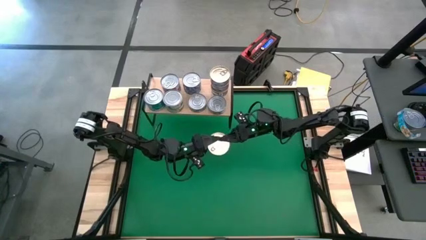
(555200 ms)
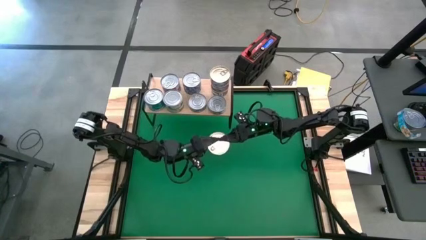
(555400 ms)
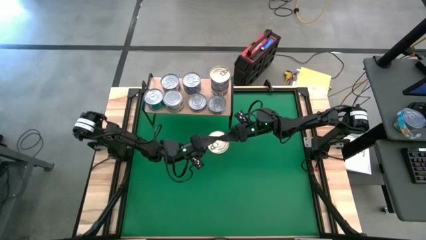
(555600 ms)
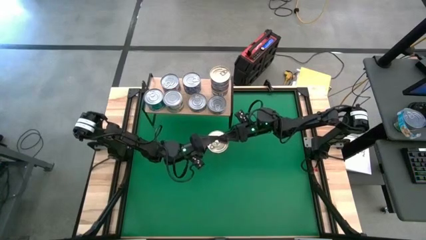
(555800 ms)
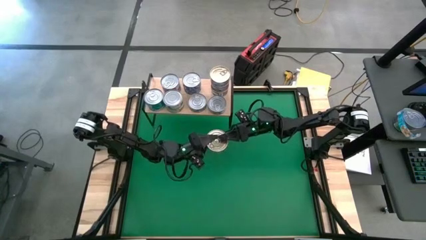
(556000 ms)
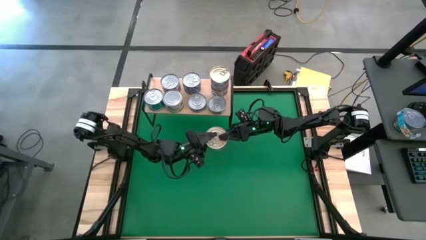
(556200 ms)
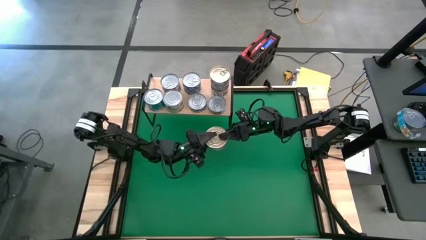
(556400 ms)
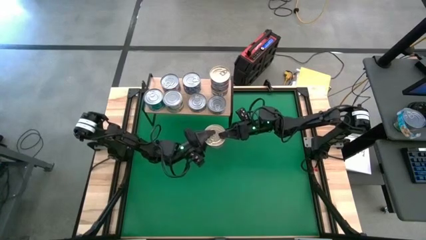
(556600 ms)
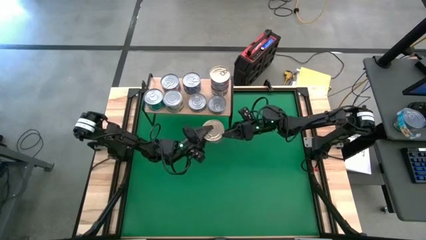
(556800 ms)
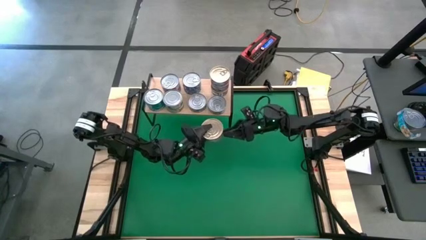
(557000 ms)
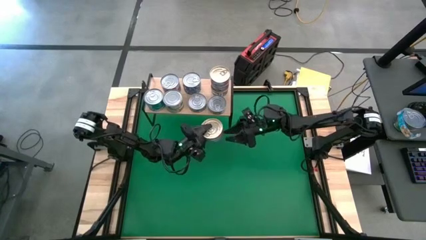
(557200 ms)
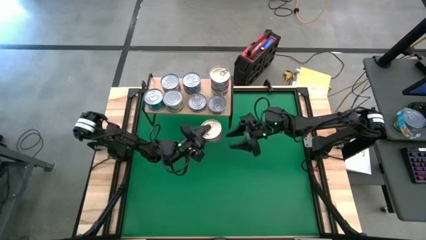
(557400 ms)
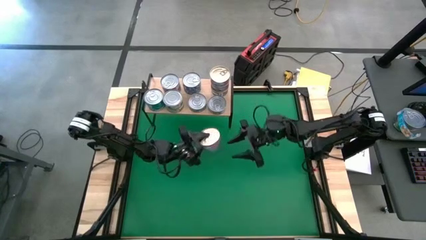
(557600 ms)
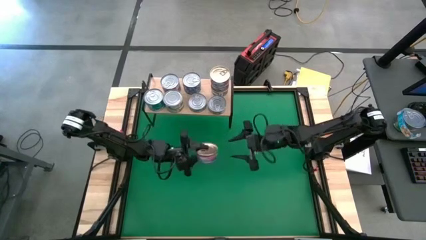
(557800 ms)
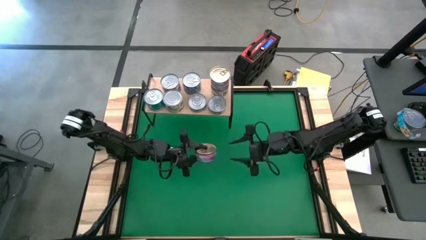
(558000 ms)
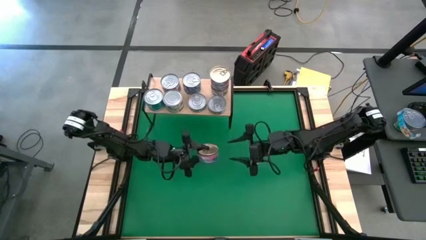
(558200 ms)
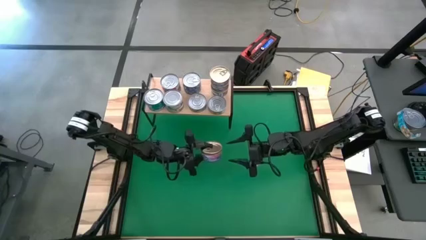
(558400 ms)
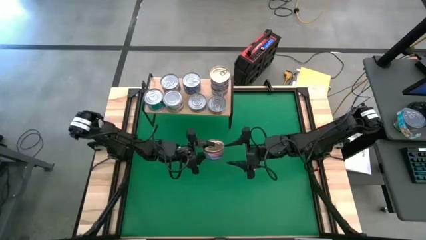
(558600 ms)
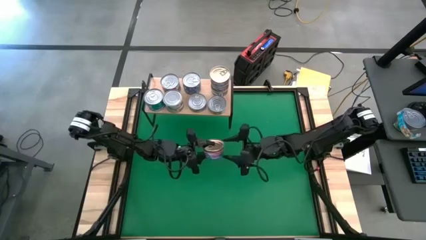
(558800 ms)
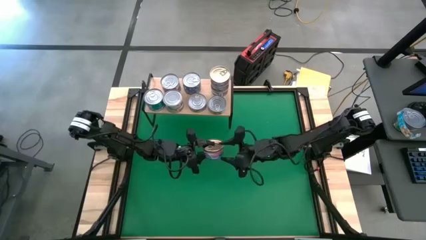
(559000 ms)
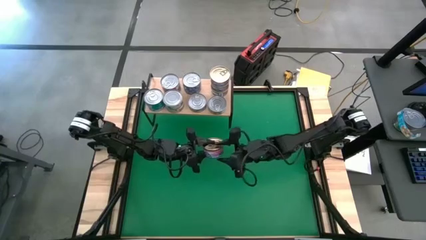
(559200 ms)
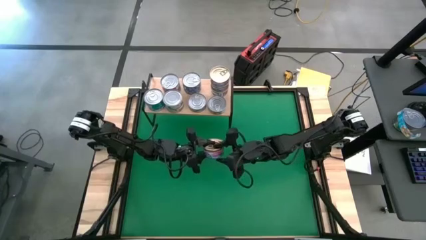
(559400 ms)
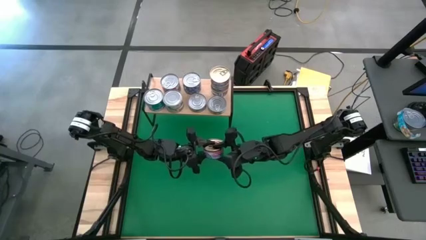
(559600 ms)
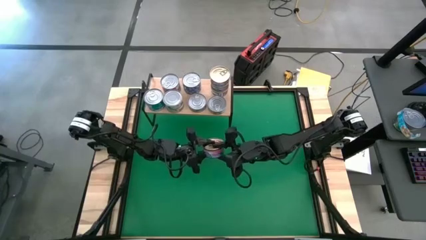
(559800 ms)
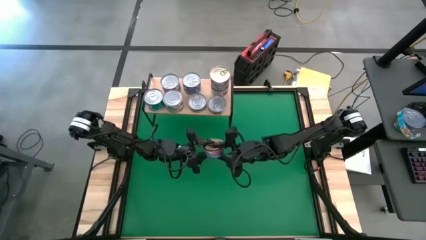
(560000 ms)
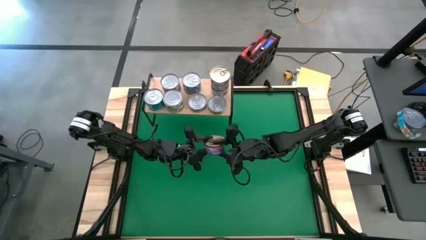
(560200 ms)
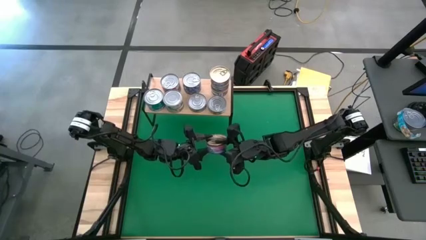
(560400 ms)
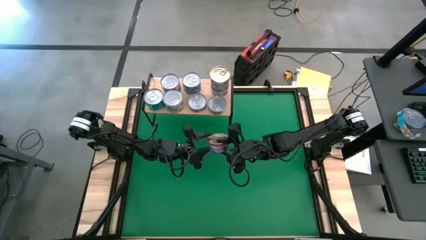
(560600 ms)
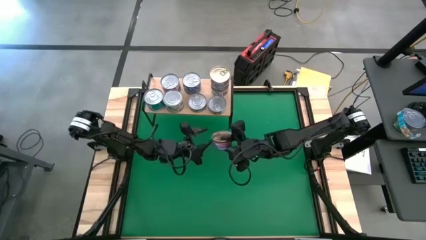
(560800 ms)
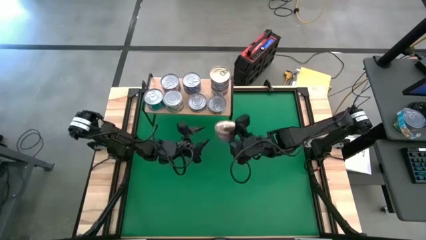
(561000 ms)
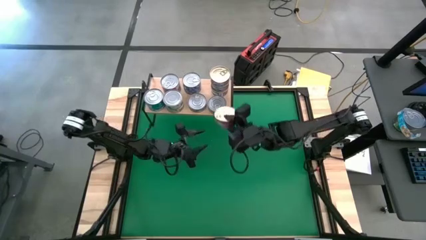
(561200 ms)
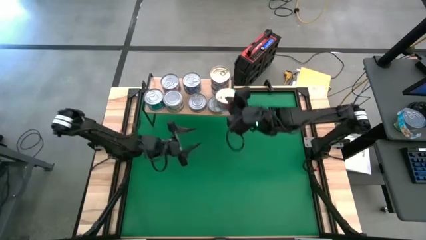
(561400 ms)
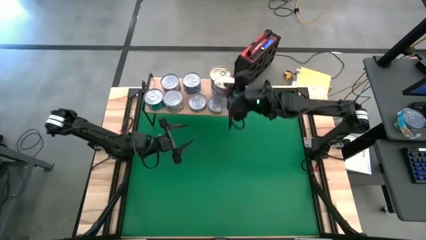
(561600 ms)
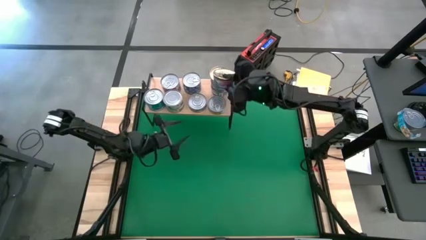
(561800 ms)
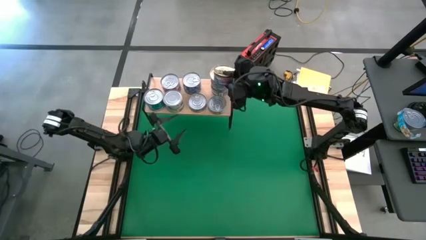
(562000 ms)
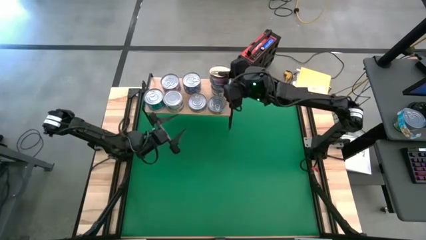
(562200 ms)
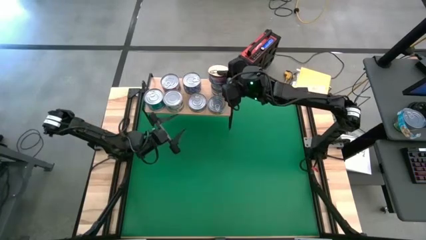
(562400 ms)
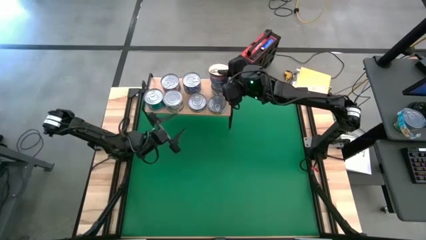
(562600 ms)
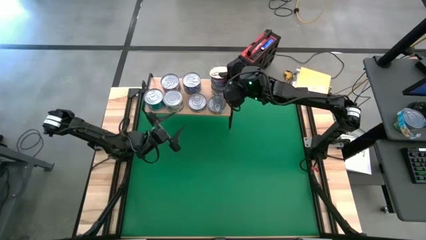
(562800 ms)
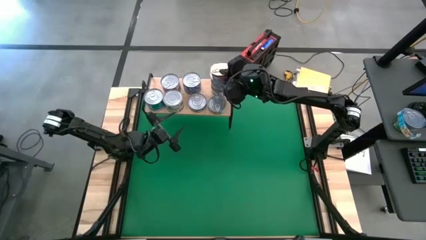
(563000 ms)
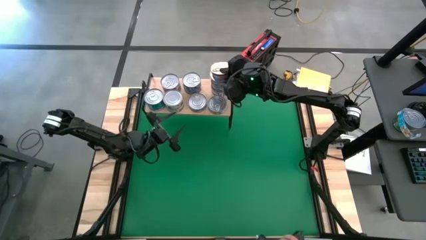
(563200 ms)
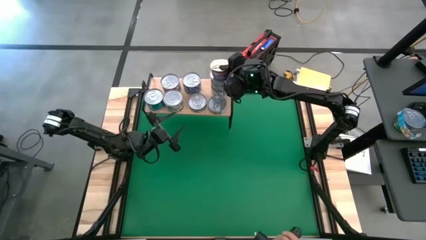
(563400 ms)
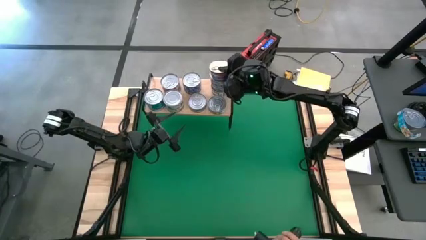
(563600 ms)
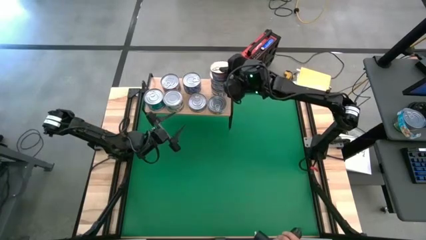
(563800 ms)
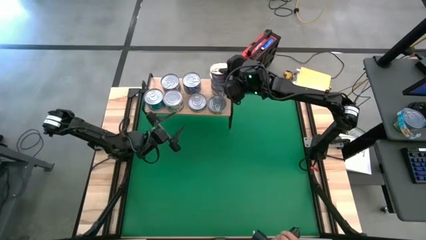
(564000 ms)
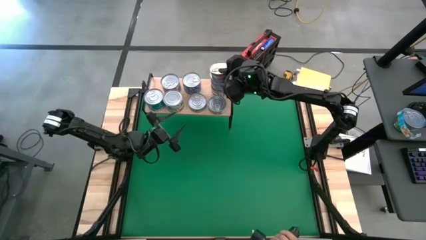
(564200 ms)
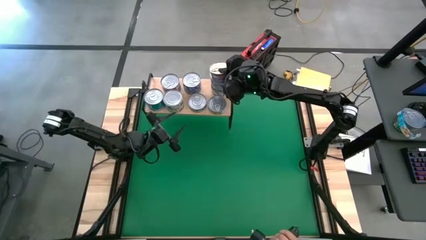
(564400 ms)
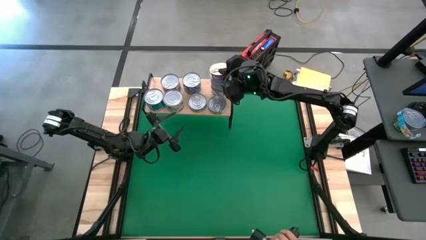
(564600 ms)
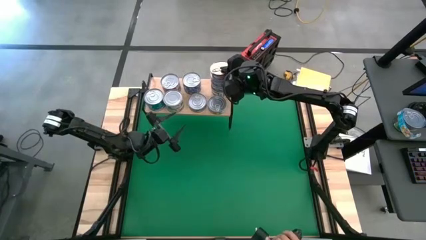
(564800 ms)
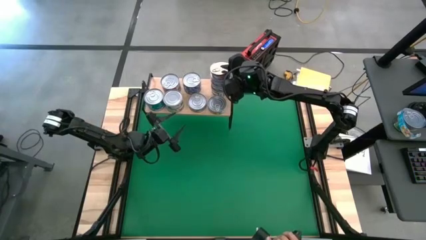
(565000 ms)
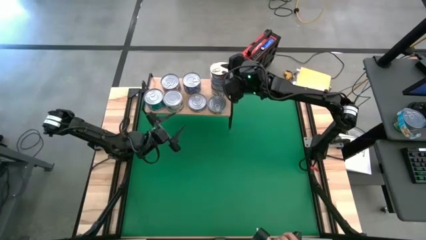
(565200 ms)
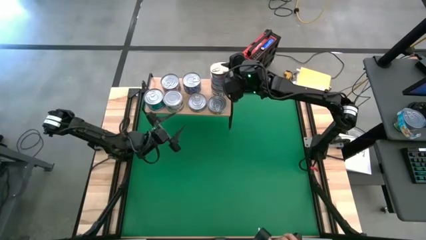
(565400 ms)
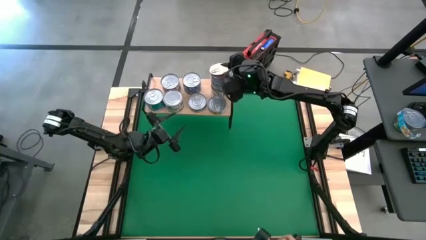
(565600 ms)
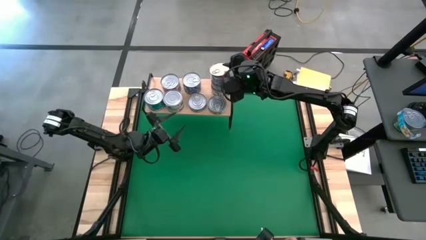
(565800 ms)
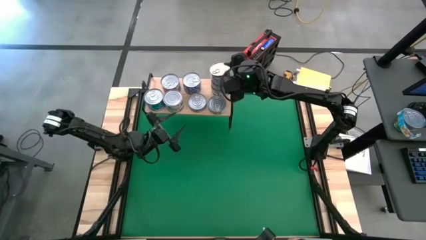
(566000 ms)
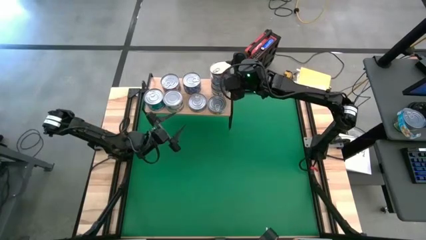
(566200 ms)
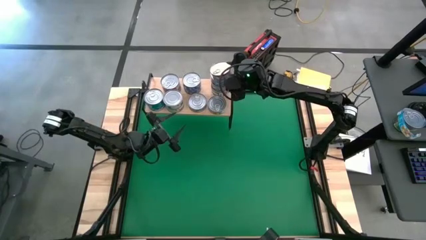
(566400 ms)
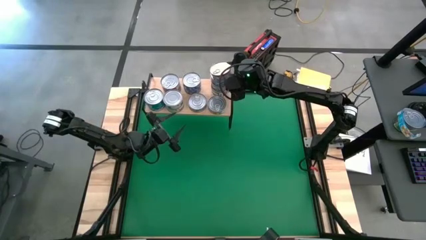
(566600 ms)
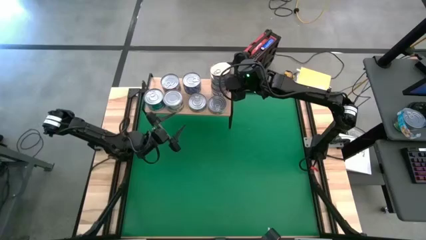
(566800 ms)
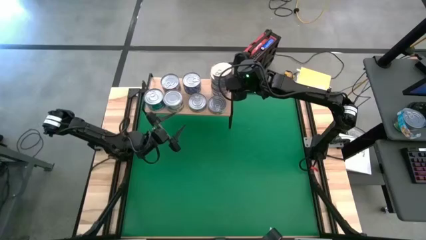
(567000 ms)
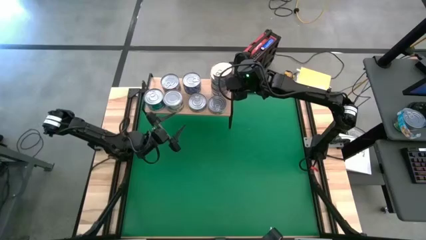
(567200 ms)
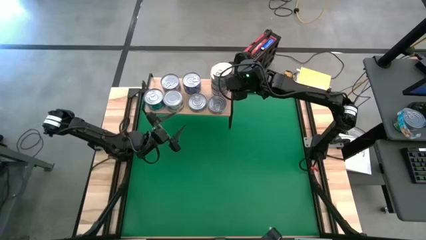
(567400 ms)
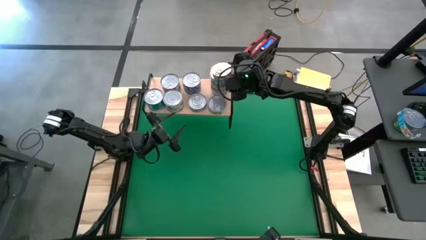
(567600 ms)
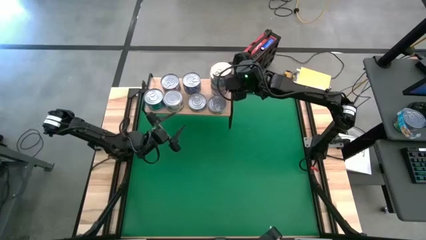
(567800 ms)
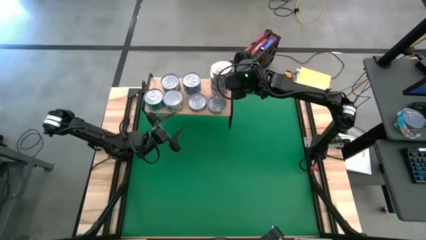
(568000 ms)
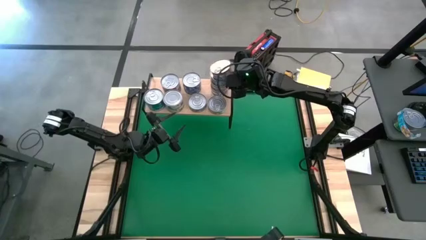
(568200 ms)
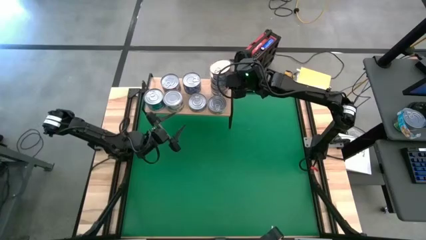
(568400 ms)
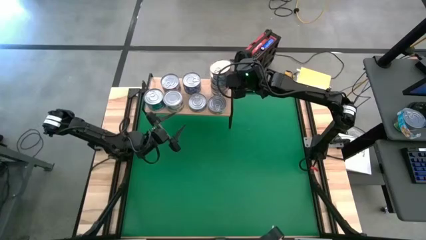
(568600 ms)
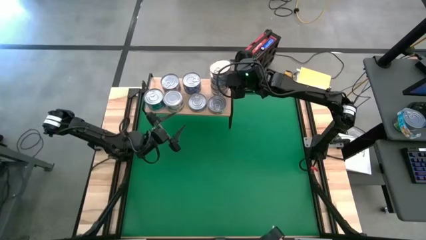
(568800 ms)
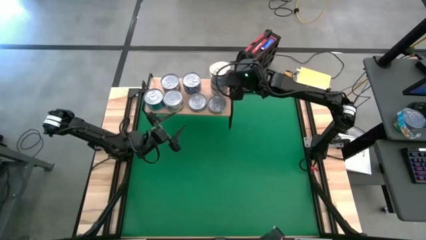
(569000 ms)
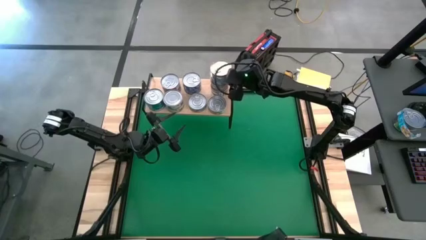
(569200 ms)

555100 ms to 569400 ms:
Task: Stack canned seafood by type on shelf
Stack the blue tuna can on top of the blue tuna can on the shelf
